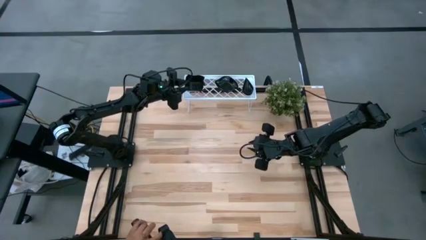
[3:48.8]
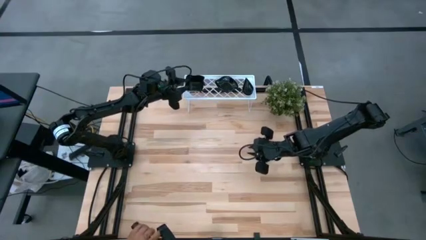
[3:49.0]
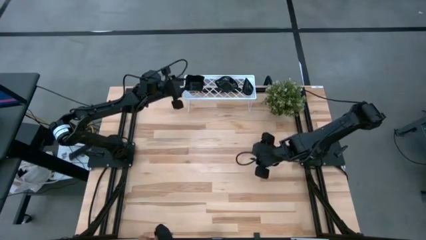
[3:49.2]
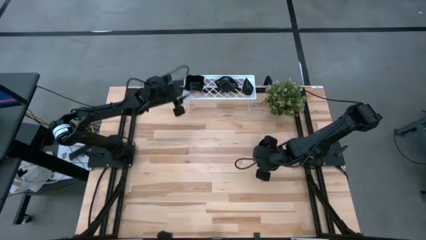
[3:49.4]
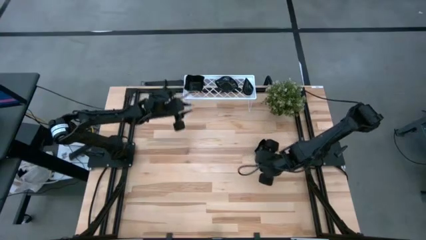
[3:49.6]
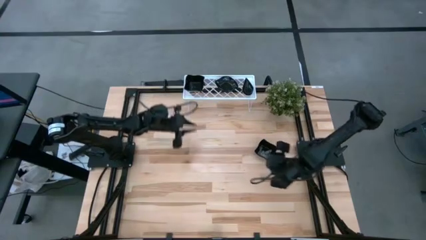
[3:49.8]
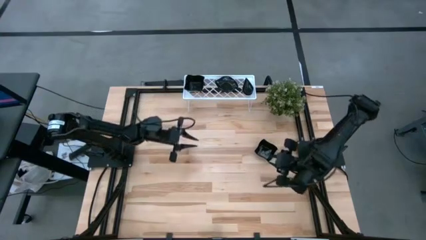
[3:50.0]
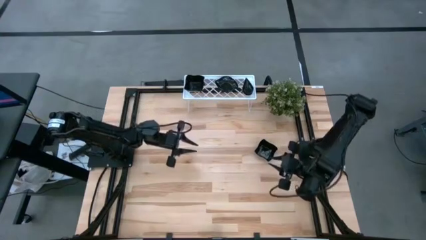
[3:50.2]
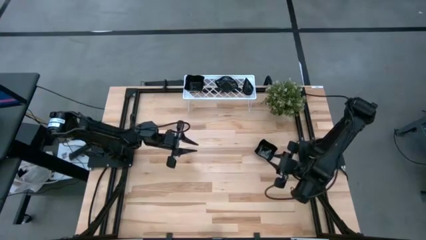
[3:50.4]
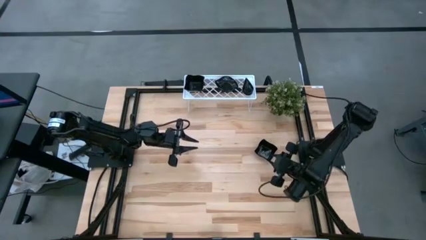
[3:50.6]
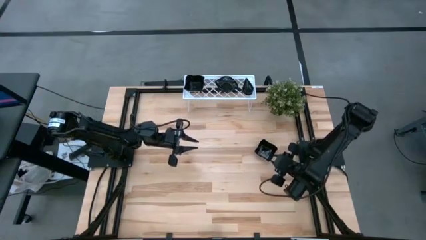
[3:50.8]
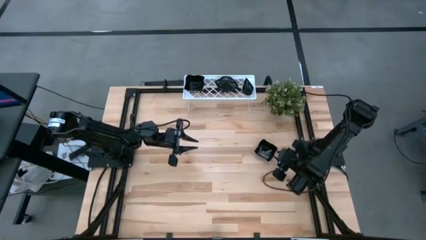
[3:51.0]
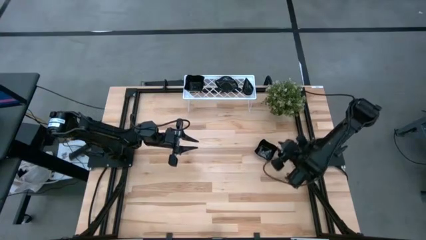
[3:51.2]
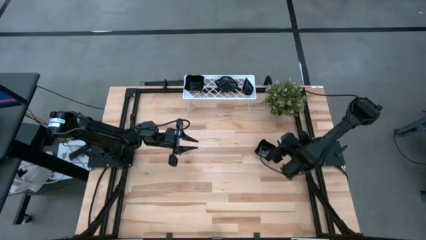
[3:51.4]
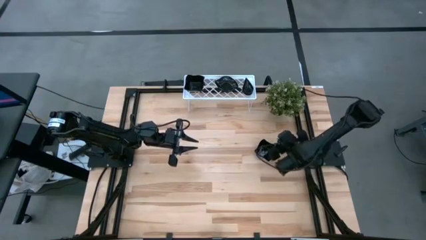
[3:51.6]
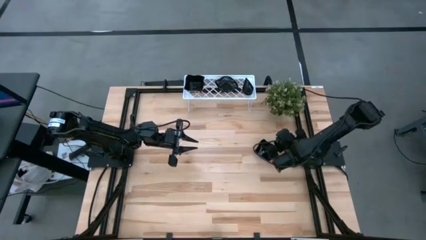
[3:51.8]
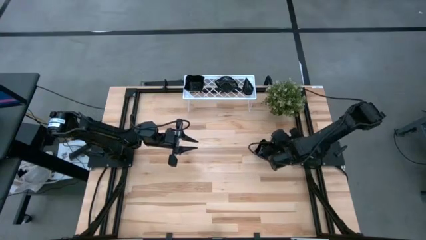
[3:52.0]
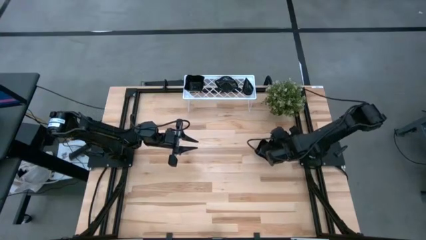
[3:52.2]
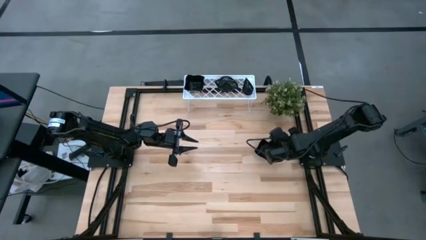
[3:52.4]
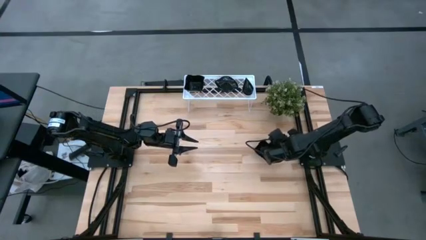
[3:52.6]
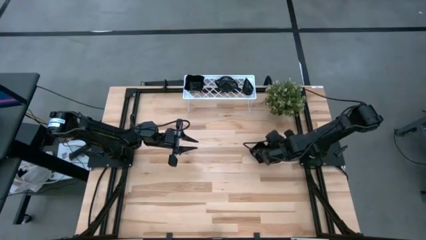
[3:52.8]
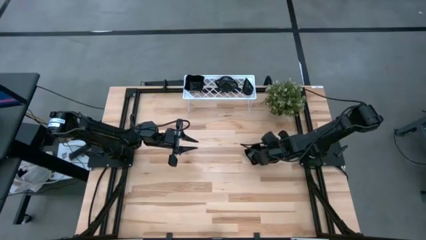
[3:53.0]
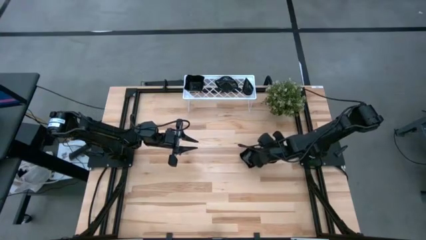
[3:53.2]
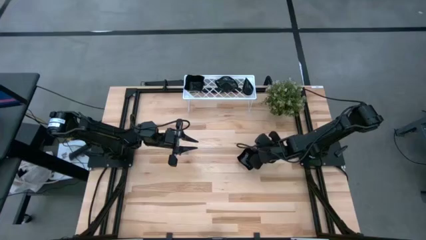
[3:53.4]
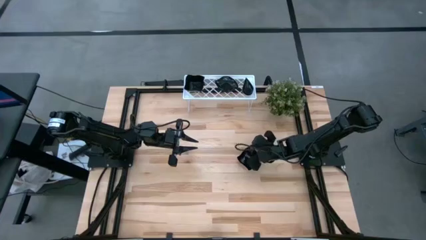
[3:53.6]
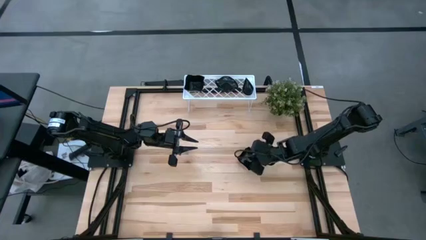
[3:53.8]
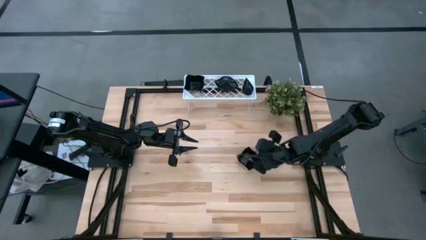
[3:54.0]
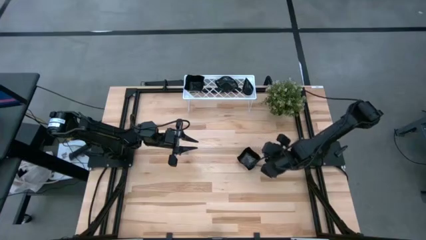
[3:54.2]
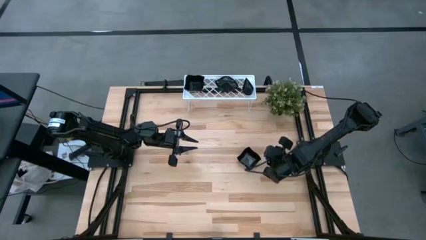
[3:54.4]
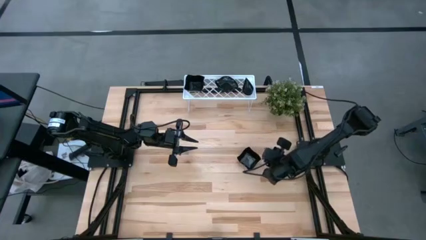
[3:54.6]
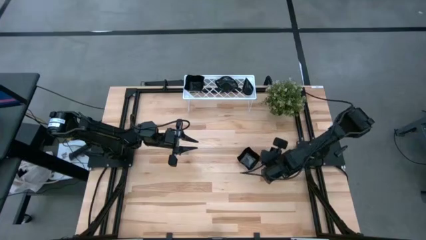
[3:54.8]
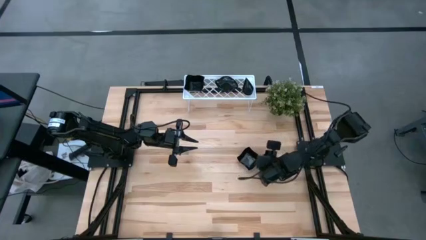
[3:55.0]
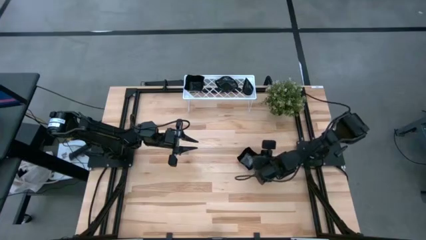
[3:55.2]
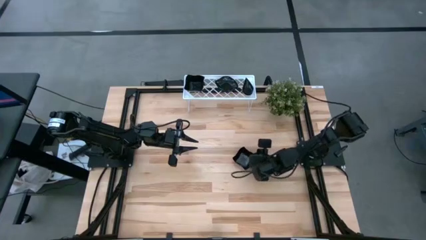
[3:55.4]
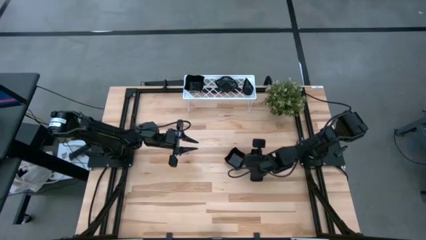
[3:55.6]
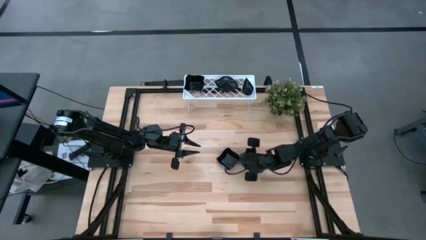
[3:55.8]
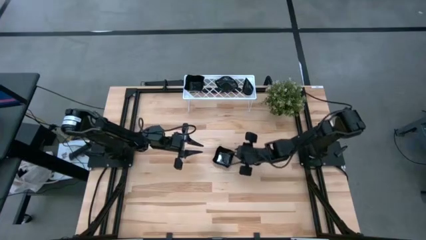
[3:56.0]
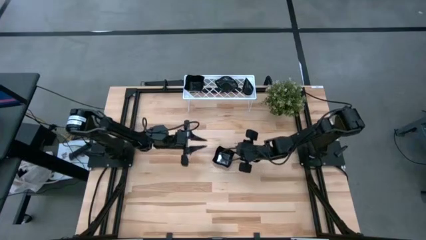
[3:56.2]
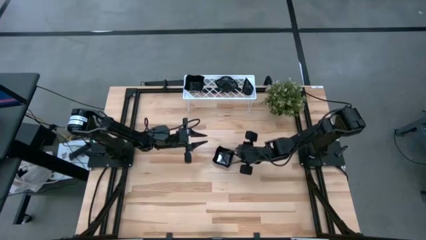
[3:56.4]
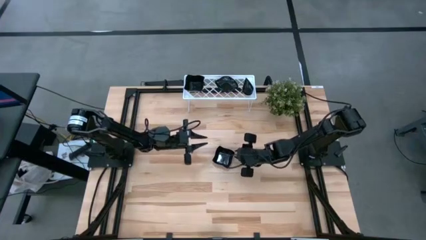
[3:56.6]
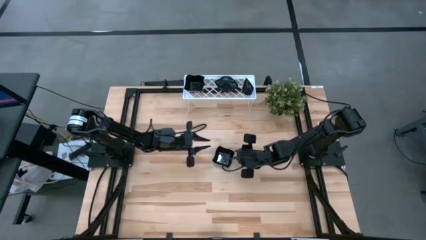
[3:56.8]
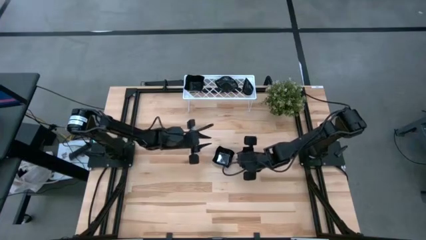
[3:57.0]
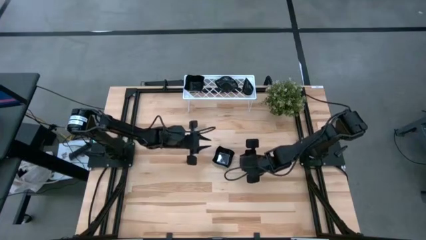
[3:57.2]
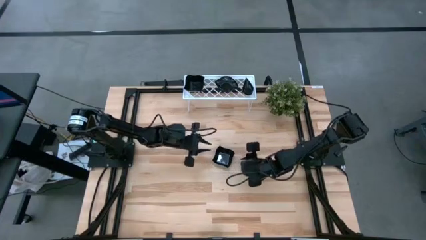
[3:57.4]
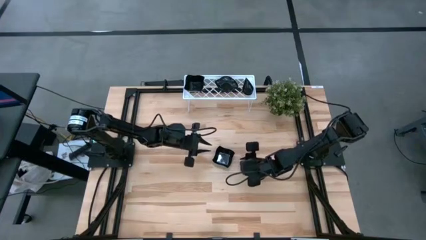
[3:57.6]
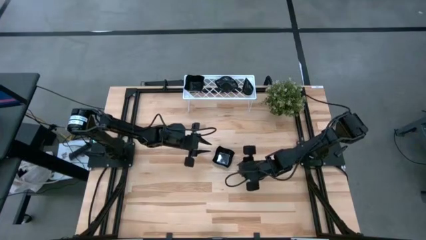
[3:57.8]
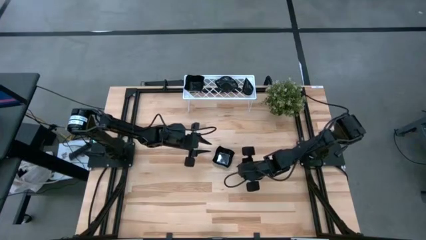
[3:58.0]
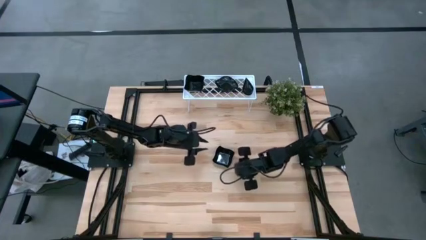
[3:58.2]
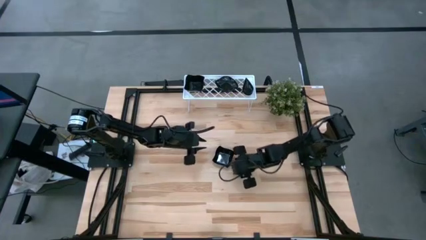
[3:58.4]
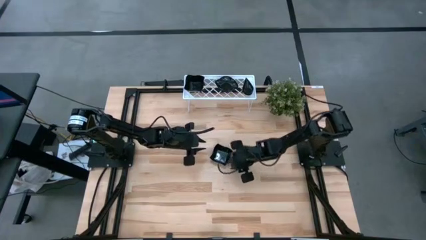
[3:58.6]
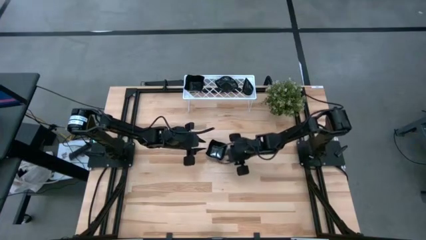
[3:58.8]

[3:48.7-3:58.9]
Task: Pick & Place Mini shaped plates
Stack the distorted square plate on top of the distorted square plate on the shelf

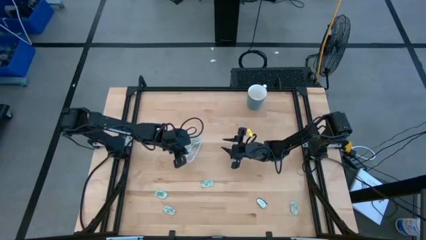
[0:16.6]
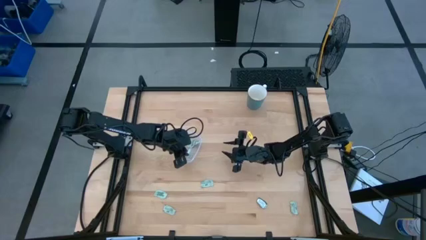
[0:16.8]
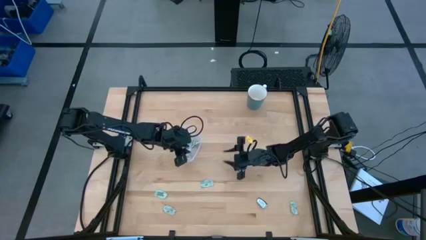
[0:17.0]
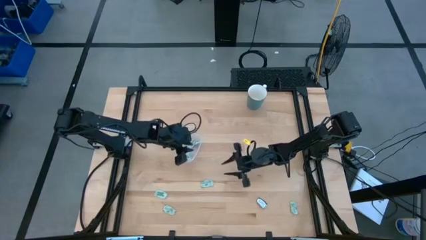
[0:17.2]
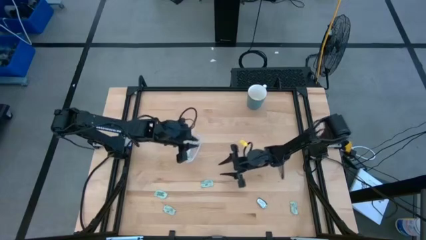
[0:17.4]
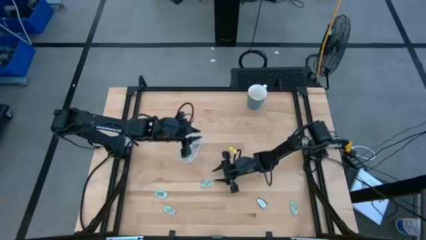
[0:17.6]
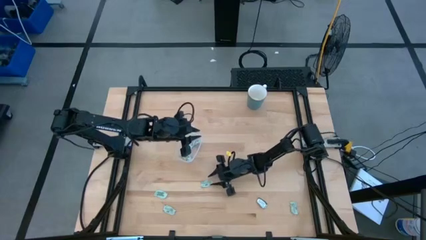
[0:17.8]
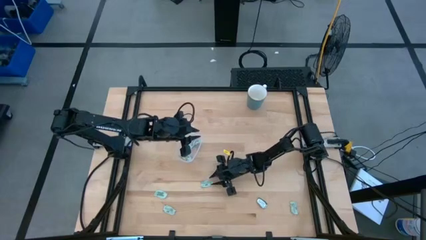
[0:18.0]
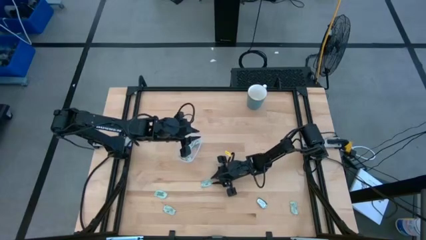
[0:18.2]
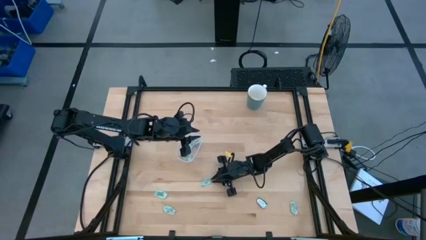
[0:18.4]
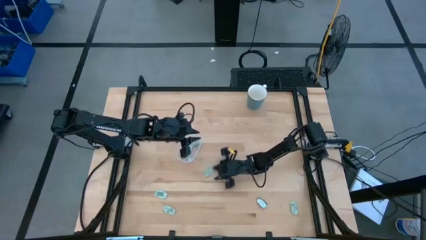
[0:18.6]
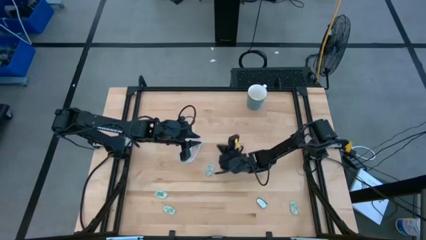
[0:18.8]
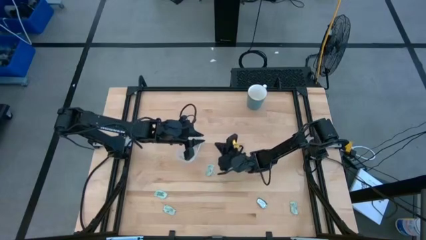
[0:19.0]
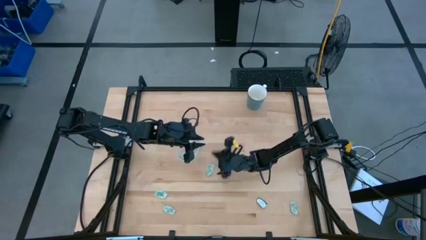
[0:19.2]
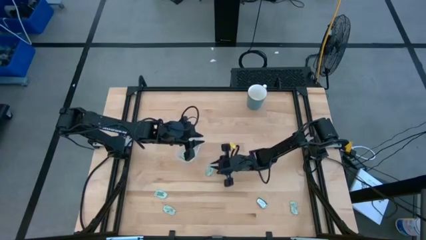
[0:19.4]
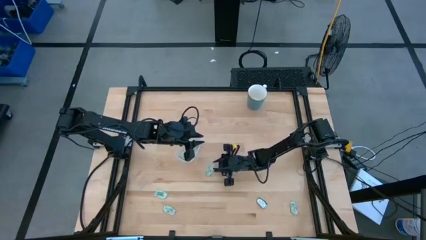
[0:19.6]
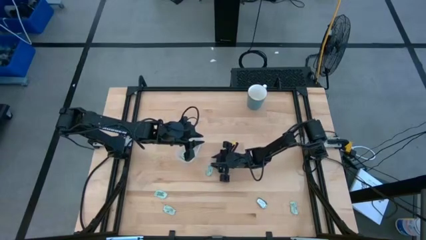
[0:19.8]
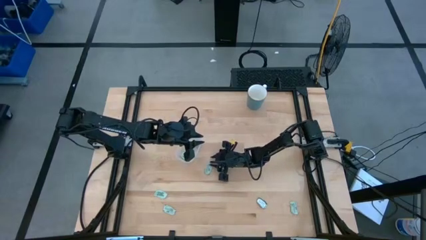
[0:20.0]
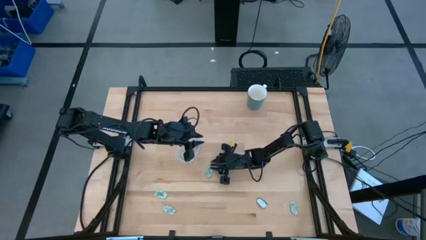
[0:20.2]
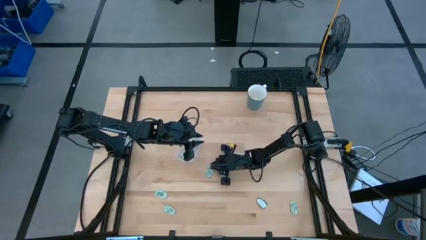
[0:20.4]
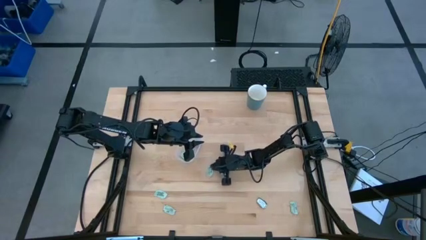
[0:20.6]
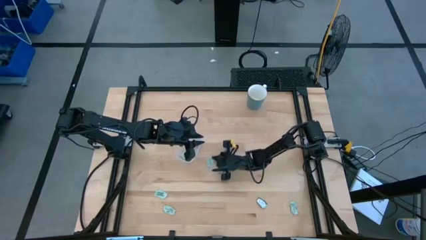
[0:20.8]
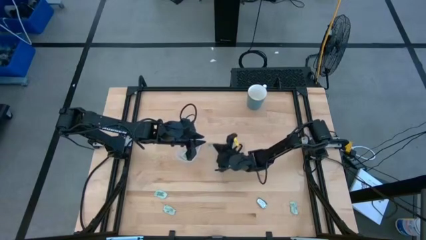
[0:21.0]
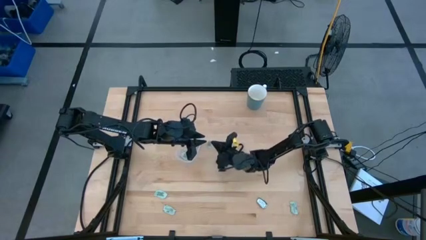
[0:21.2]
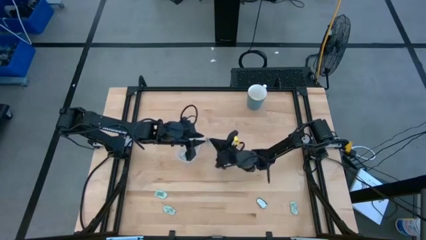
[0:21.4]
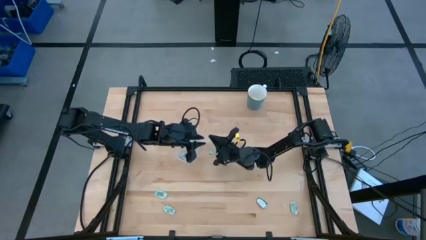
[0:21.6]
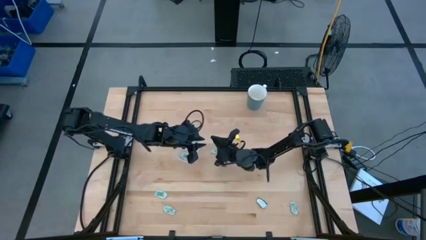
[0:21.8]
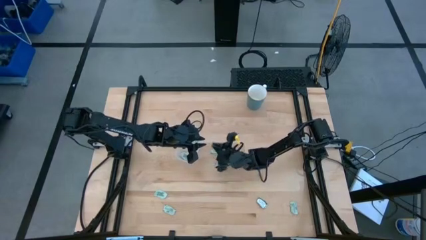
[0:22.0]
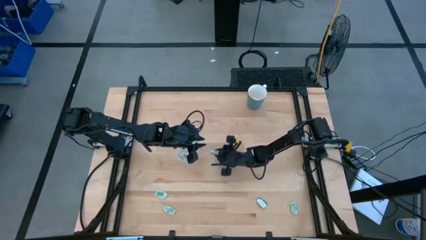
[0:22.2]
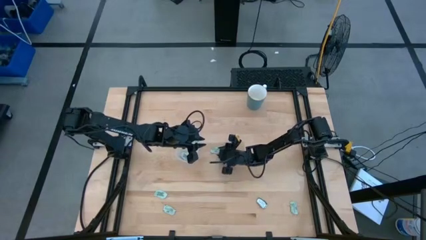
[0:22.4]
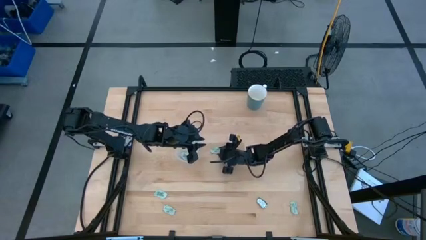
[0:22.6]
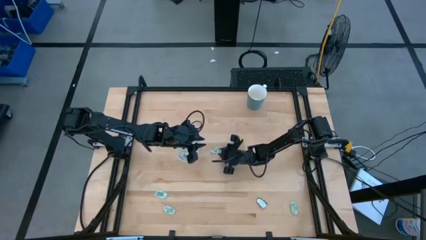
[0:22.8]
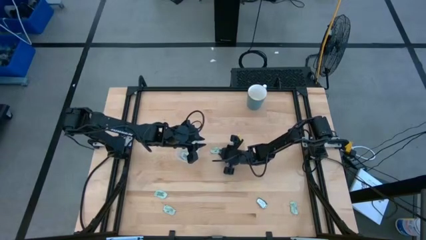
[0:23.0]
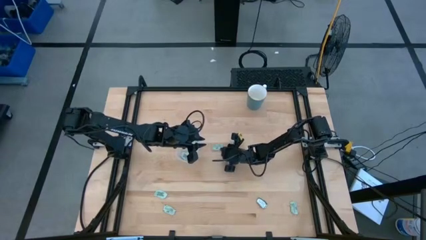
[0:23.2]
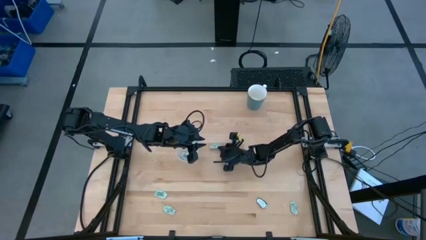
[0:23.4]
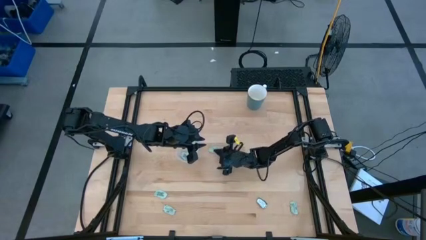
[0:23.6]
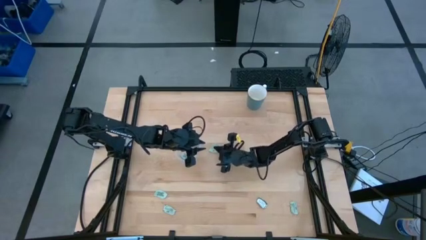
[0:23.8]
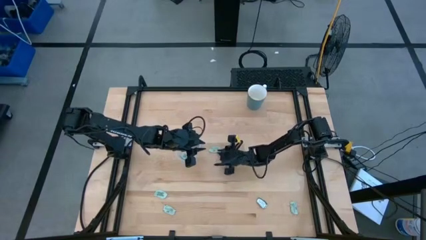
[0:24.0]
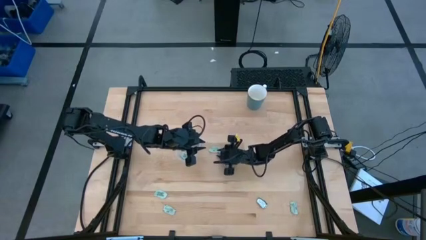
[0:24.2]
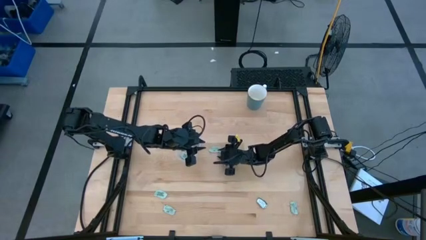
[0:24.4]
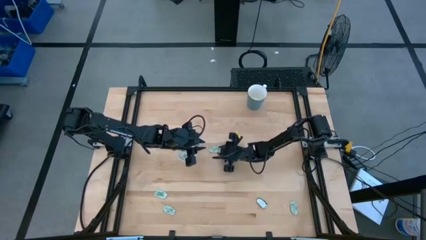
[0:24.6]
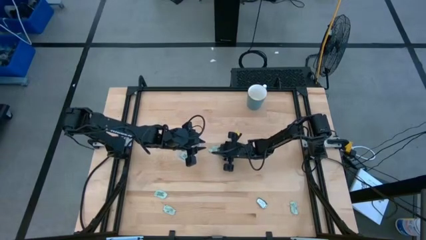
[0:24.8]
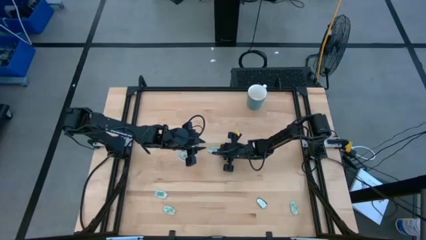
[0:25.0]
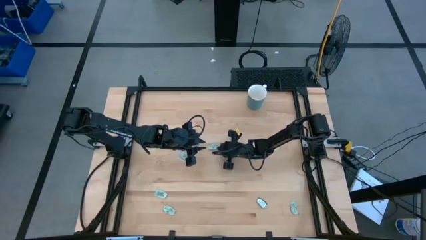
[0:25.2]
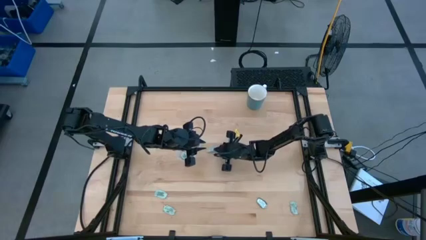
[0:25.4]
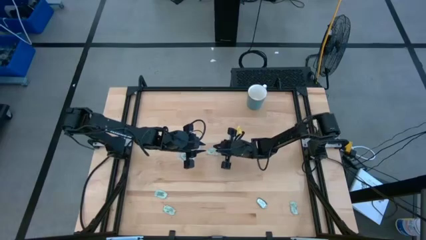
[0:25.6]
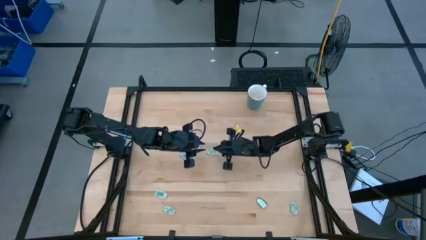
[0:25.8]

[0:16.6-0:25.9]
Task: Pick and place Stevia / Truvia into bins
Put the green stevia packet into the transparent bin
